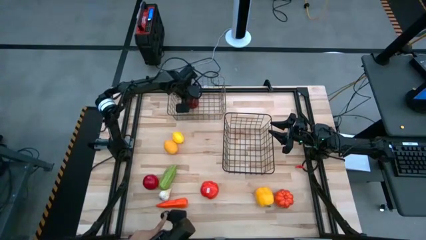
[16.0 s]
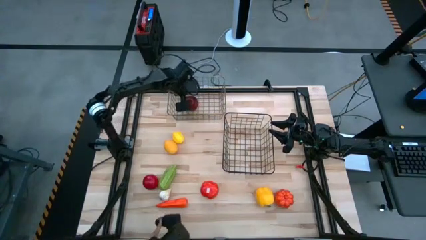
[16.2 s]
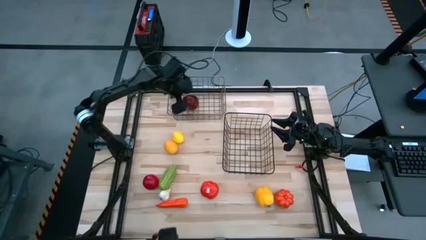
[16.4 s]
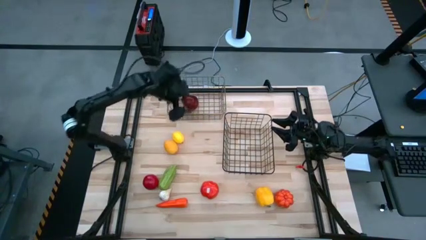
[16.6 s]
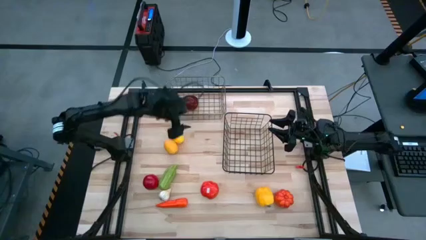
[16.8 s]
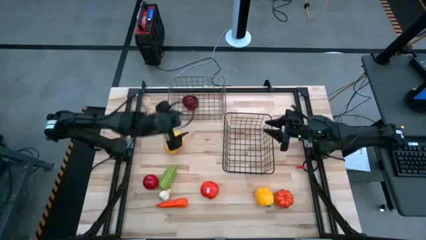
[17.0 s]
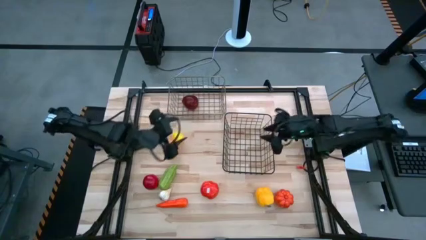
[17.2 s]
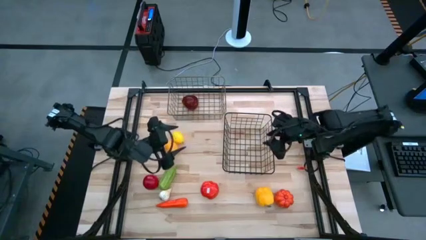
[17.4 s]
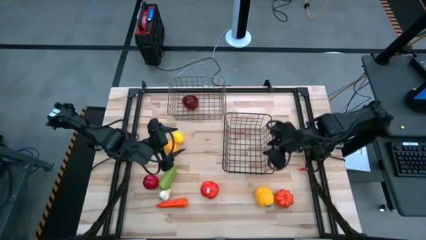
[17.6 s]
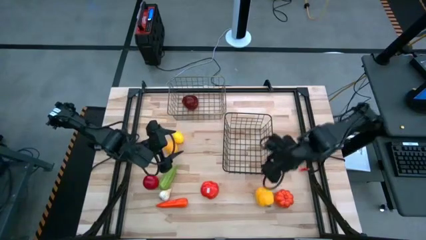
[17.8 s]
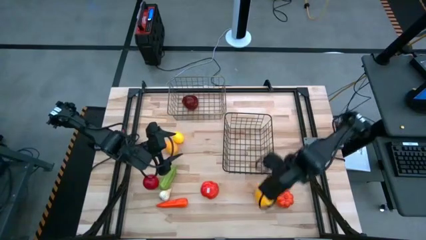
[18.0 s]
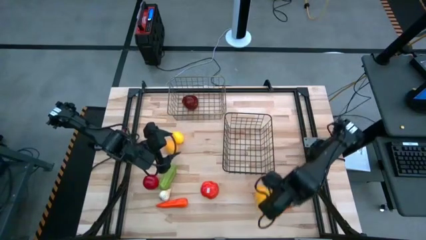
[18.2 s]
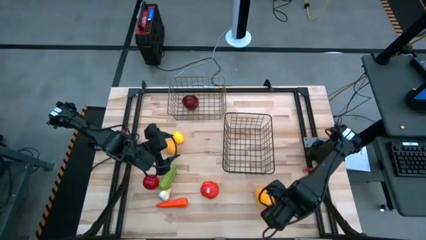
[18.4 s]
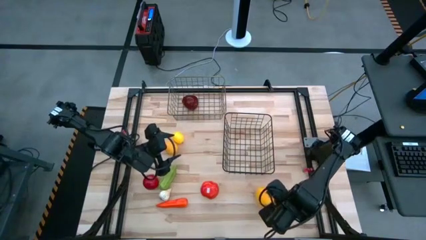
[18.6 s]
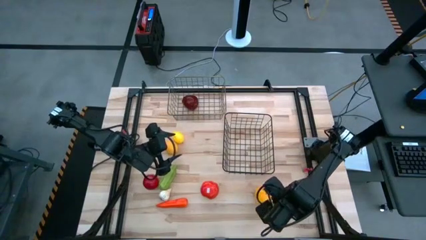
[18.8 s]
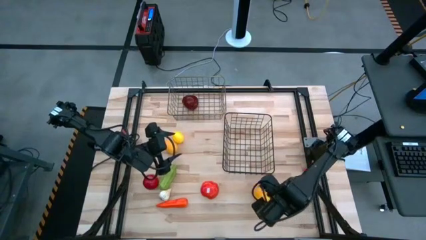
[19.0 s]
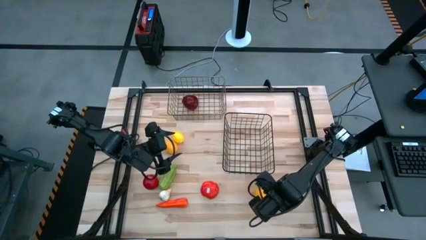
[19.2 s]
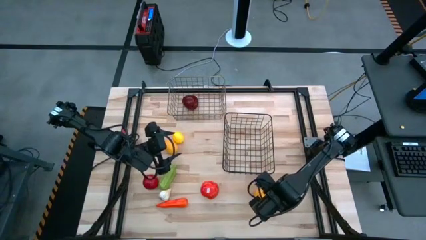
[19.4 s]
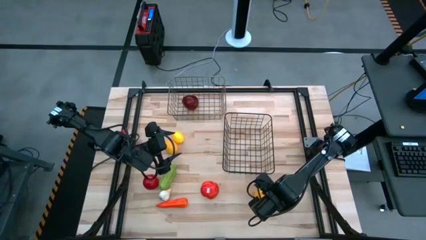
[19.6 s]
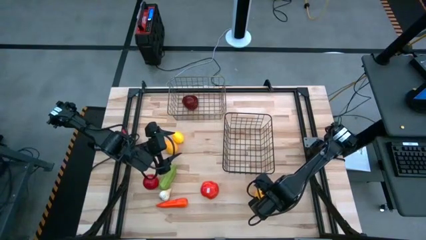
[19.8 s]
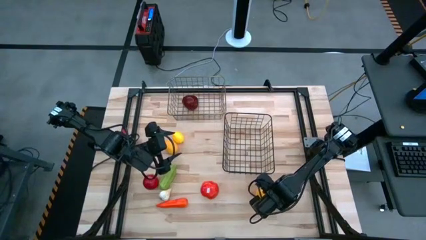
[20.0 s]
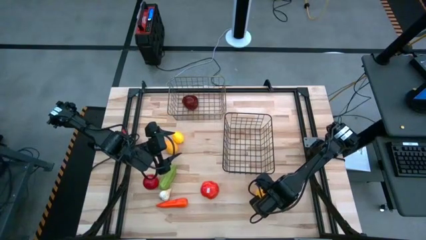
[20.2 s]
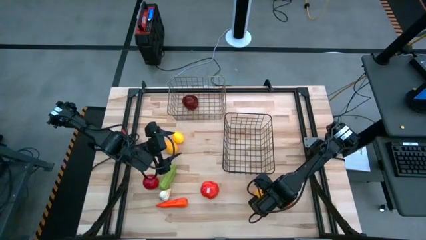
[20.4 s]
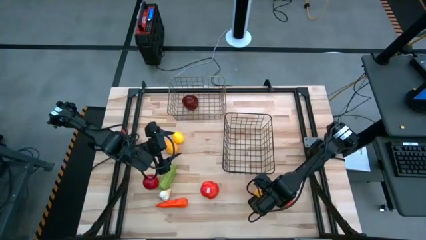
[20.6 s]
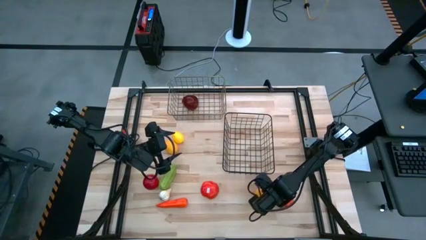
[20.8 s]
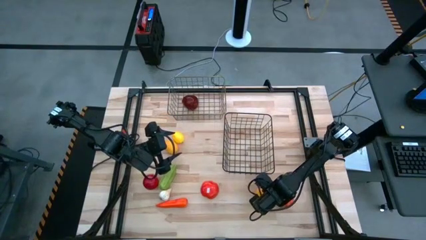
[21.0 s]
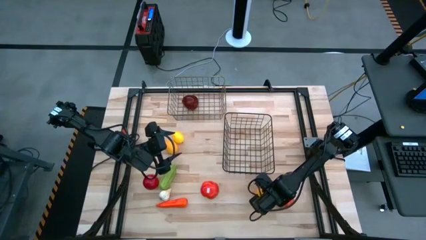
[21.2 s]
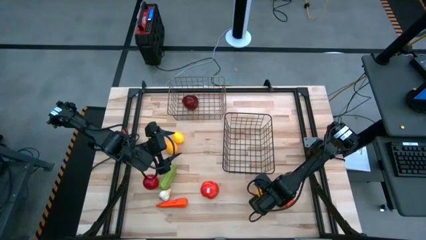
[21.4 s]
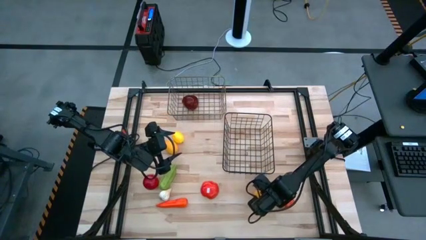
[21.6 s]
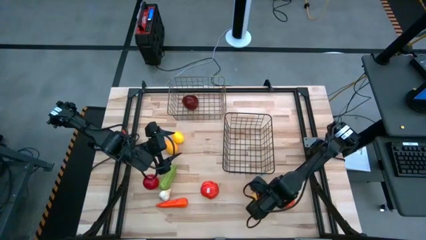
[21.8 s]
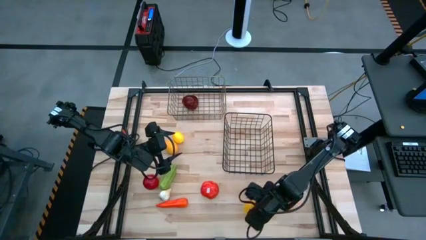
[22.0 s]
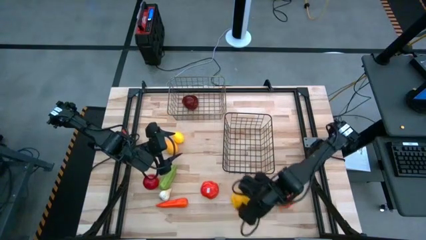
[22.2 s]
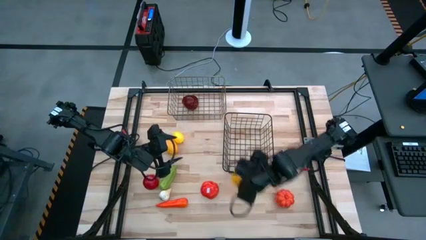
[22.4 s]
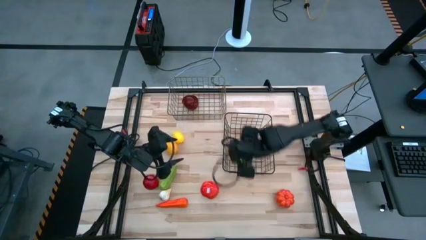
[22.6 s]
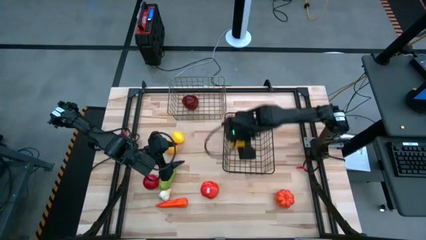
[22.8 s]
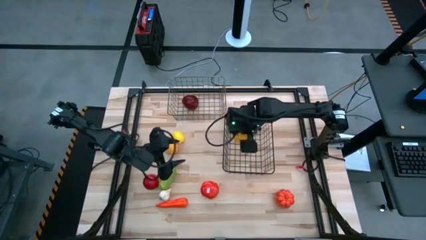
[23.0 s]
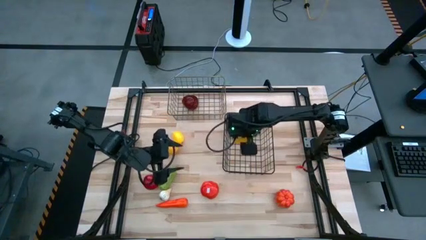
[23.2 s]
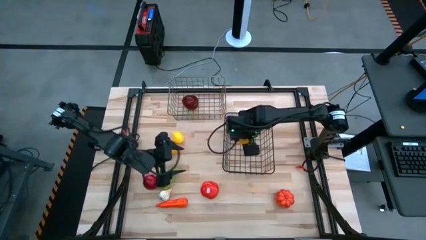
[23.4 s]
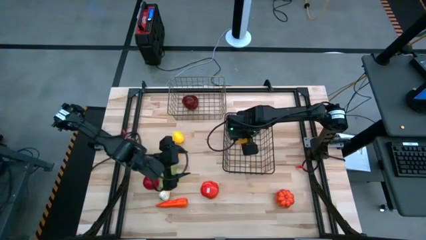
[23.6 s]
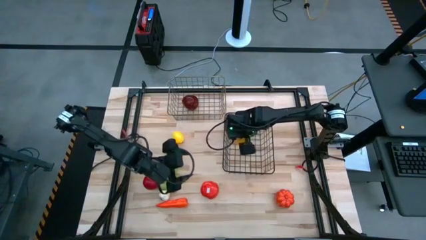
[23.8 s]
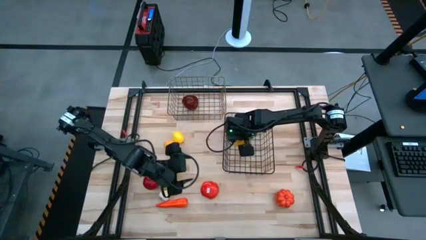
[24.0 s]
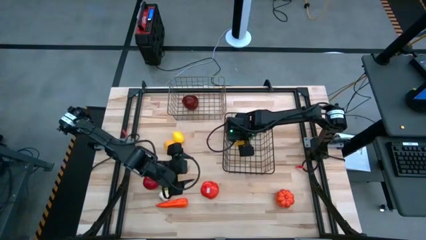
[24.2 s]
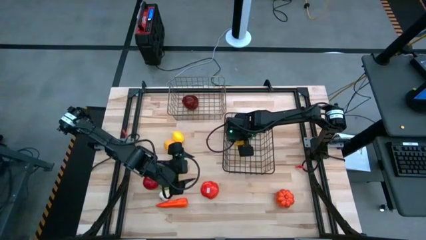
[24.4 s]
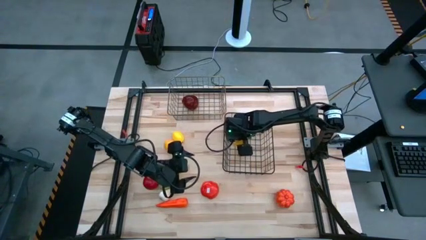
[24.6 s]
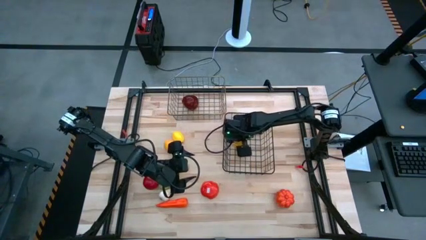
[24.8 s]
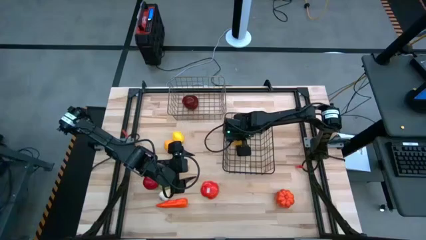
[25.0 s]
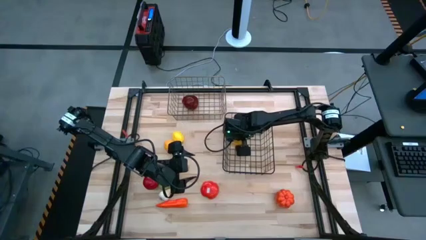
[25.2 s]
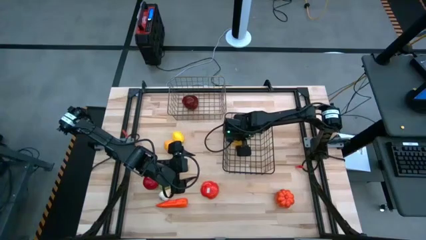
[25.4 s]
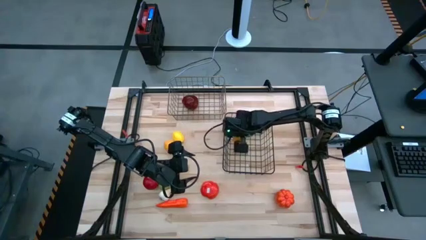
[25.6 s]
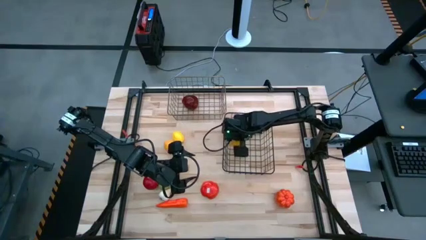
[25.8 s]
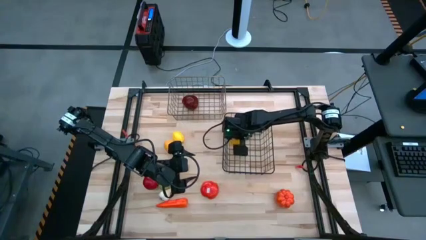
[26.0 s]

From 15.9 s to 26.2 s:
Task: Sort produce into baskets
Put the yellow bell pepper into the black wire basket
